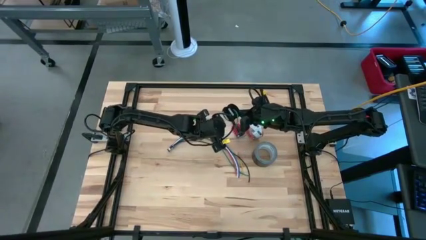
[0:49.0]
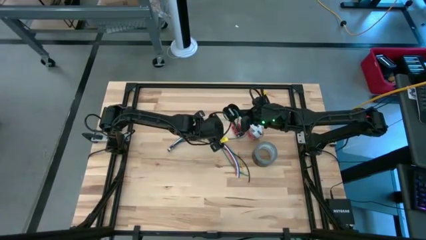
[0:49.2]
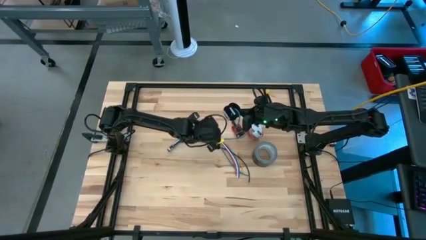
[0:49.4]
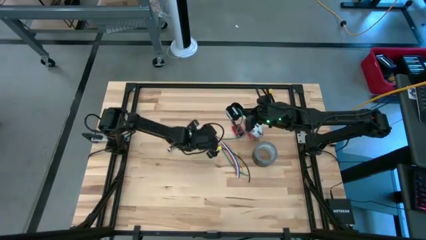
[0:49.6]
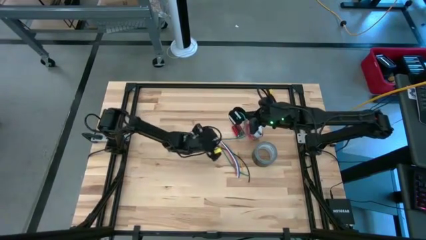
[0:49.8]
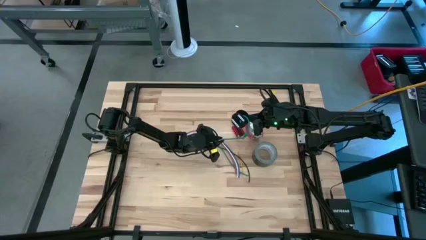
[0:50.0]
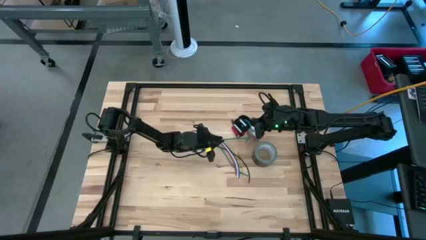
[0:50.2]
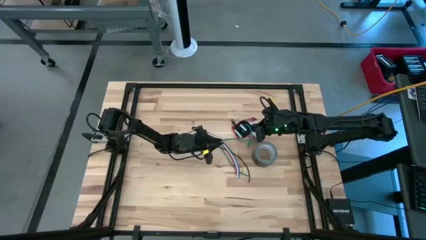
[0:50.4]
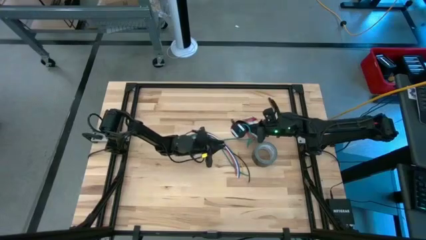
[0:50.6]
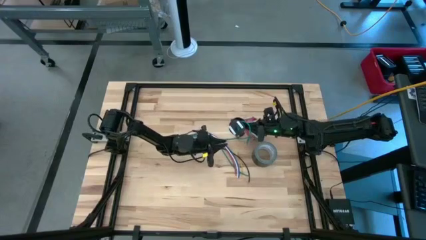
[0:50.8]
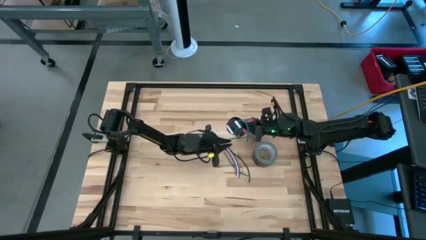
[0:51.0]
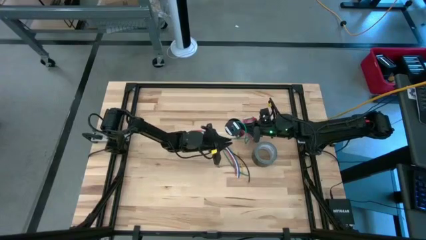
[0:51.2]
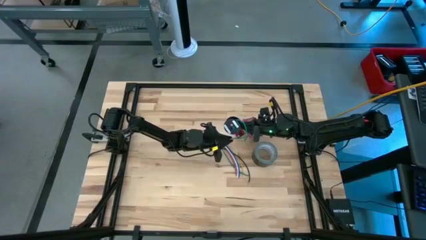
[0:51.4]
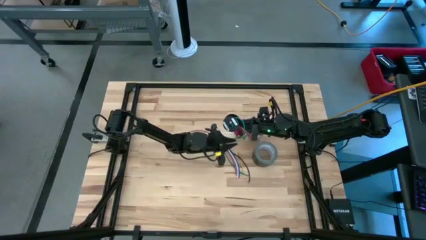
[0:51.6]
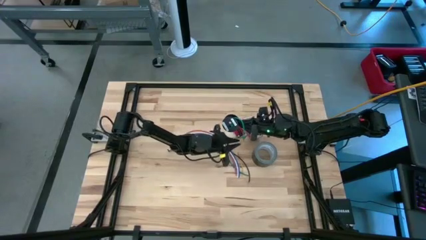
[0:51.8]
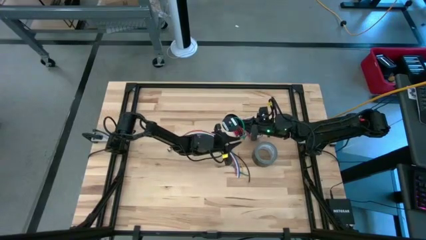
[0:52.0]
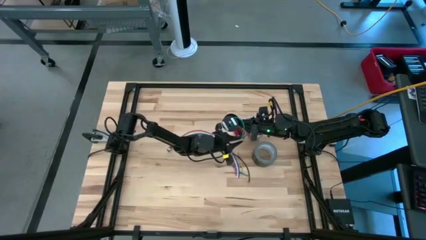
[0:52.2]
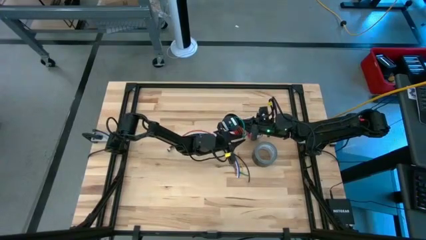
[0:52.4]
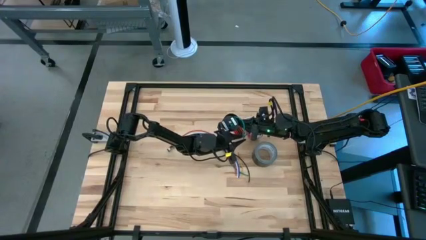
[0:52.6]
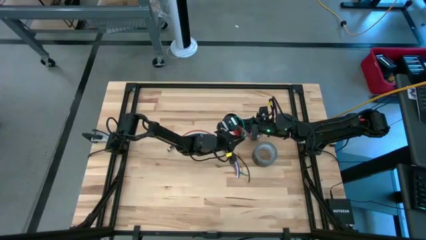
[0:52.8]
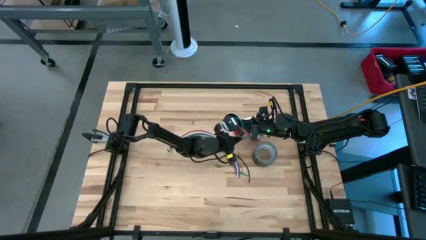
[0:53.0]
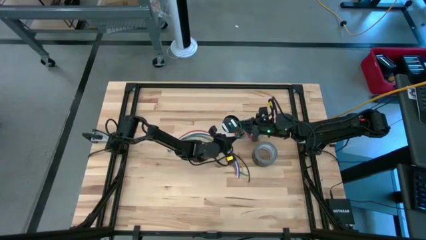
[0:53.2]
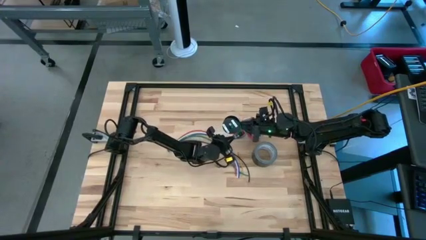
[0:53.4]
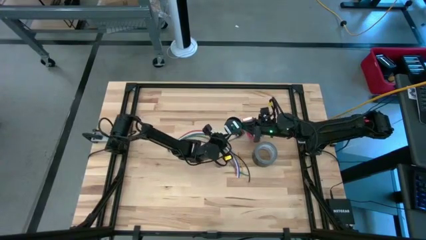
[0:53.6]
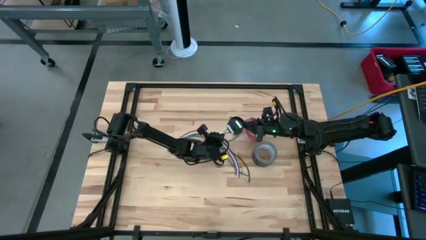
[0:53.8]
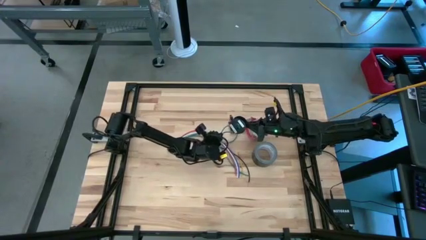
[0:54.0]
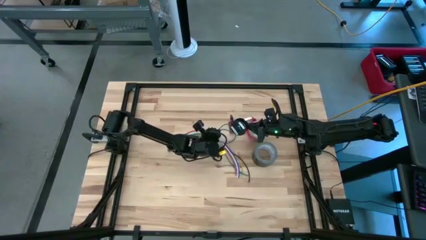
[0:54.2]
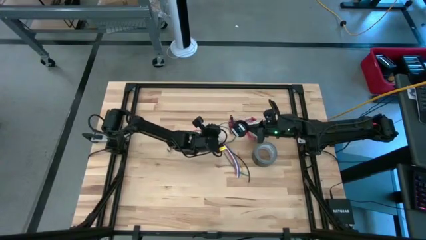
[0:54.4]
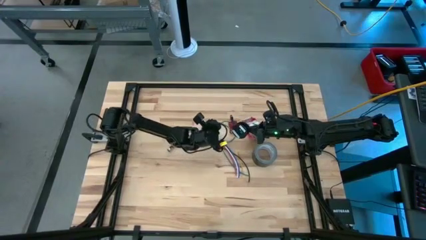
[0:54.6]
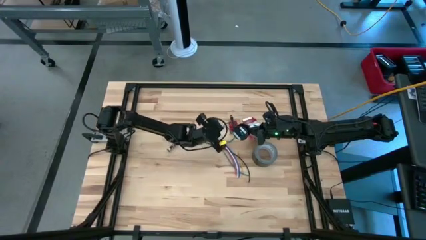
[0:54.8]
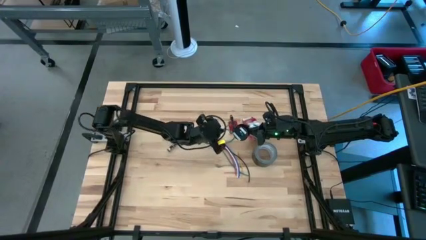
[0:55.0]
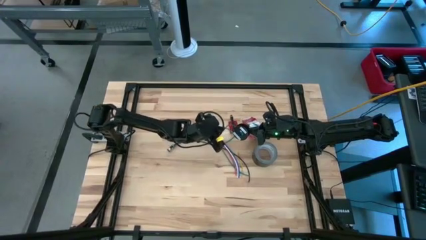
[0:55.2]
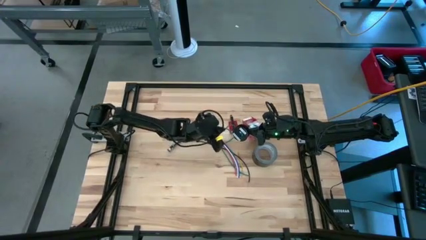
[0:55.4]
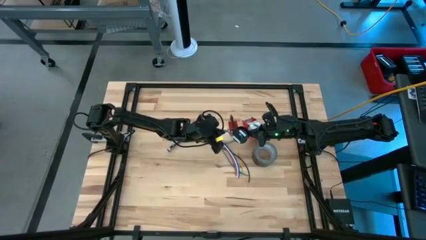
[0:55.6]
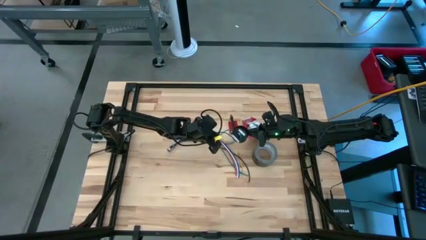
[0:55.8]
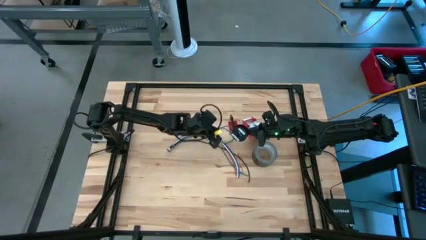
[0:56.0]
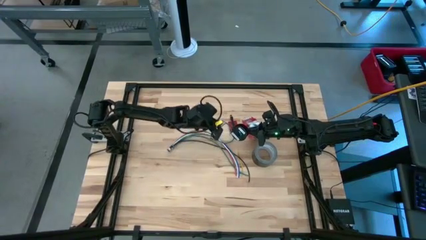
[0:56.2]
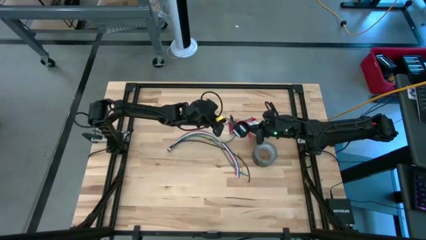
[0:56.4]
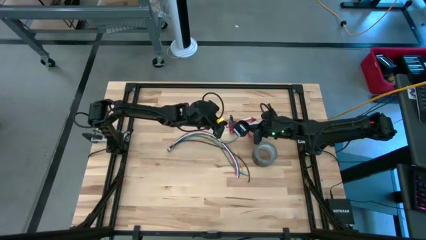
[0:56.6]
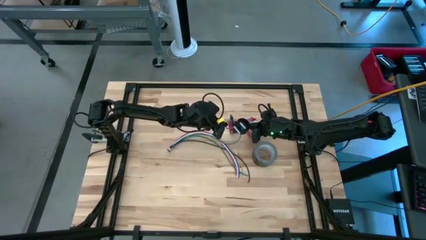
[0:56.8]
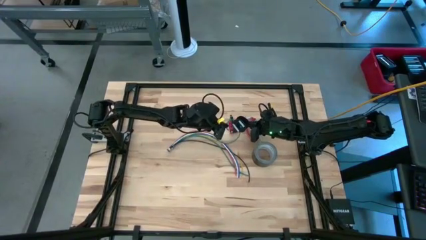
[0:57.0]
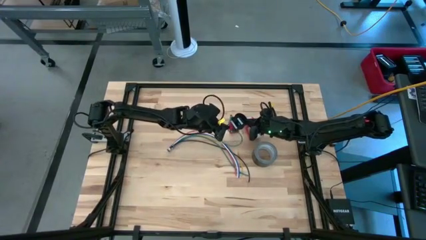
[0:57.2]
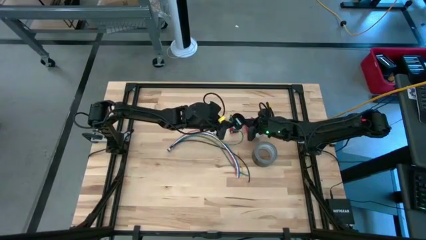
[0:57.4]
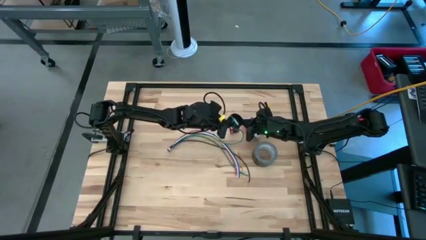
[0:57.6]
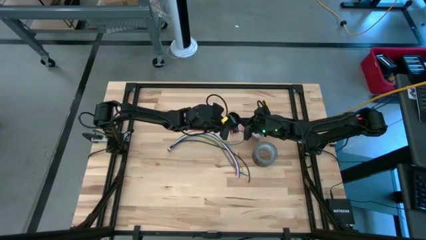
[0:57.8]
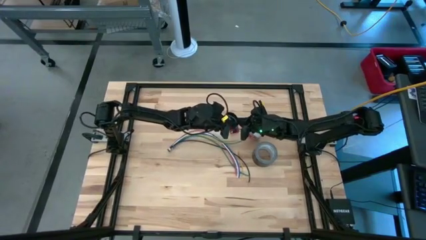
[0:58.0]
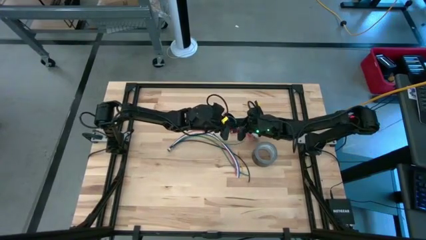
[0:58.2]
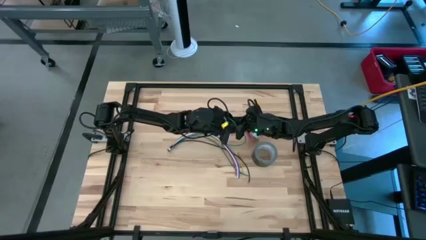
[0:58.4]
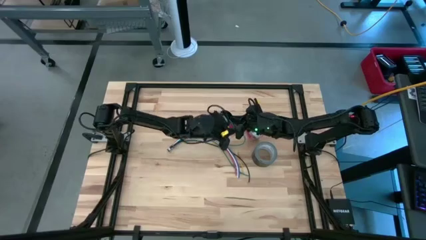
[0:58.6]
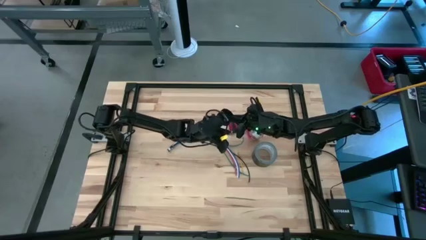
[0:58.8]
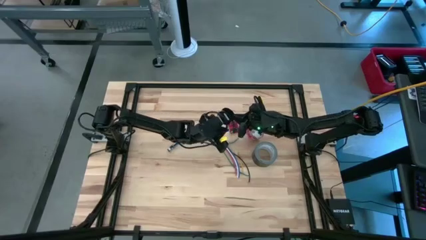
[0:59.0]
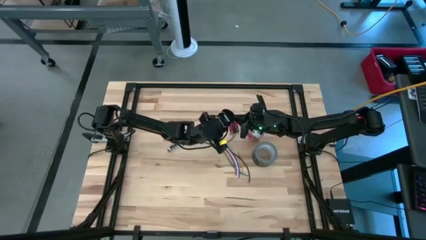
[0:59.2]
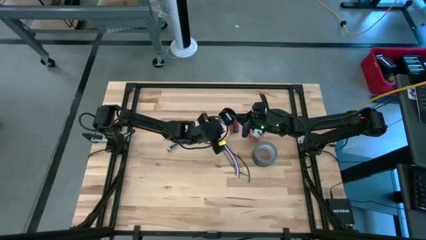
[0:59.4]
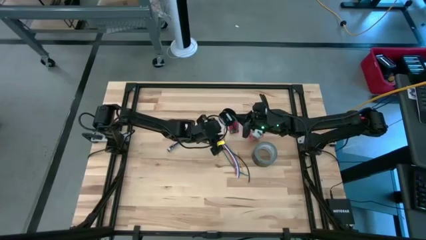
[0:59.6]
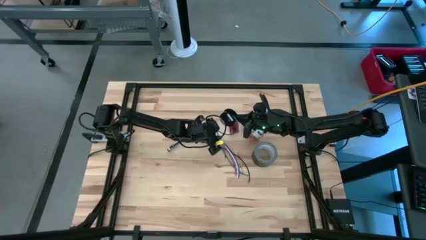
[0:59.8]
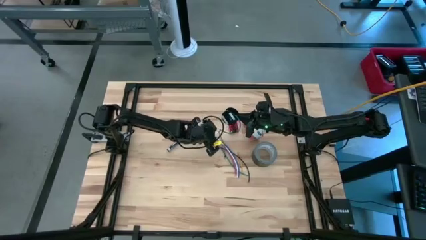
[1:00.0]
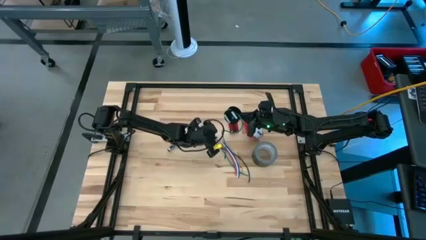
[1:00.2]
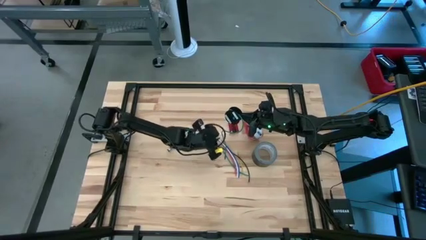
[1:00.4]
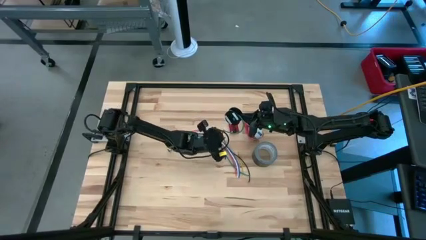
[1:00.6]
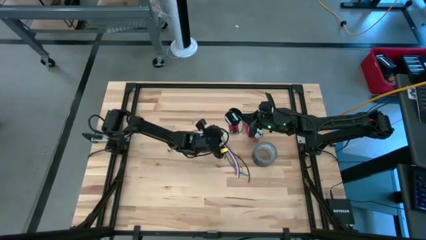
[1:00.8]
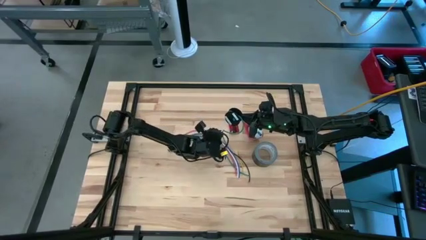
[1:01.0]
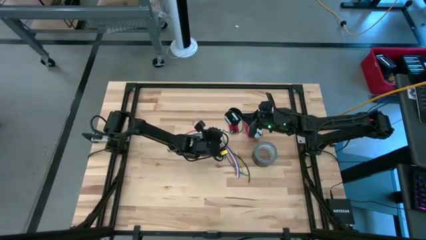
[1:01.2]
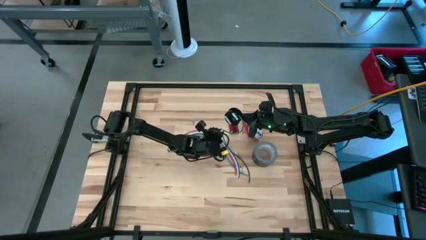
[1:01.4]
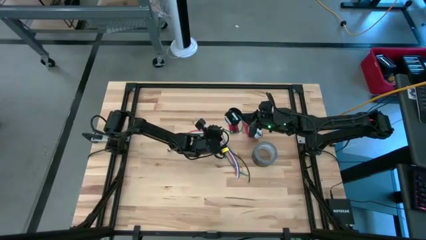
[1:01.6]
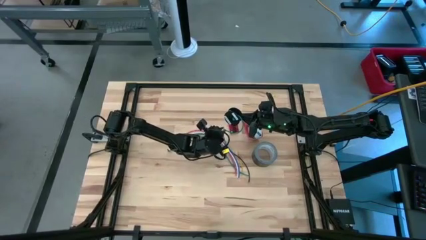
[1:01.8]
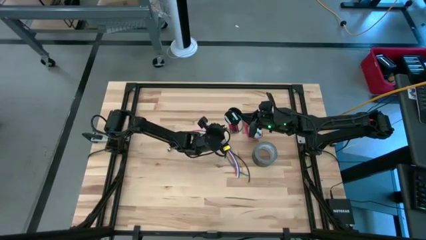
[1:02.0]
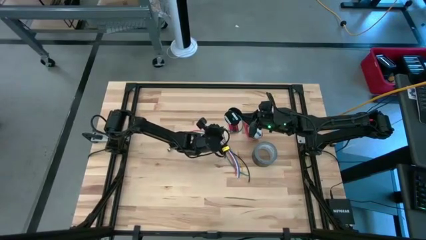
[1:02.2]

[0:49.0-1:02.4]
Task: Coil cords
Coil green wire onto the spool

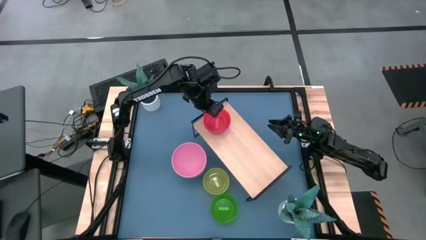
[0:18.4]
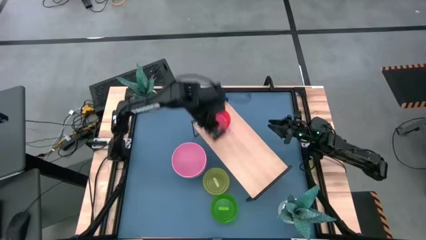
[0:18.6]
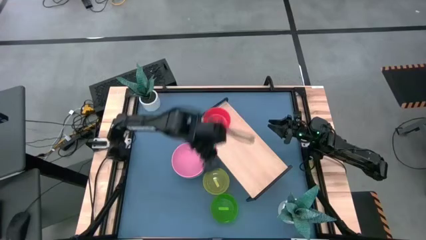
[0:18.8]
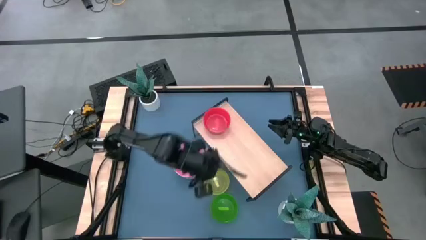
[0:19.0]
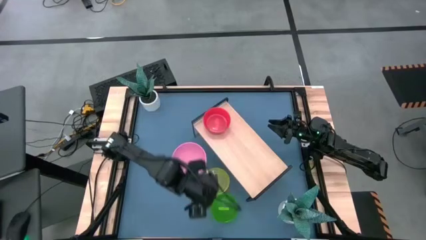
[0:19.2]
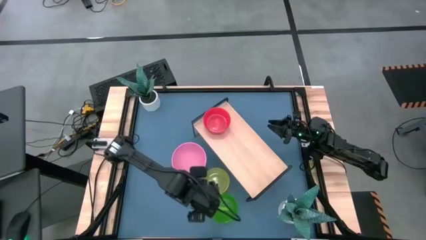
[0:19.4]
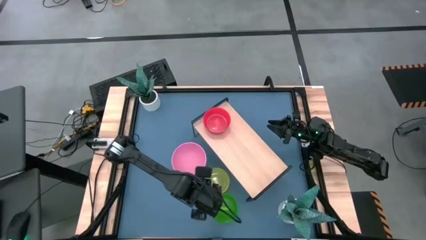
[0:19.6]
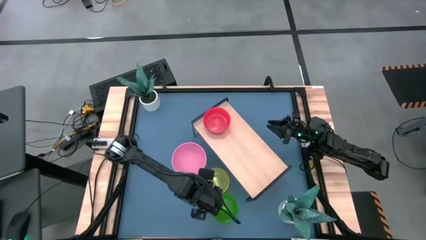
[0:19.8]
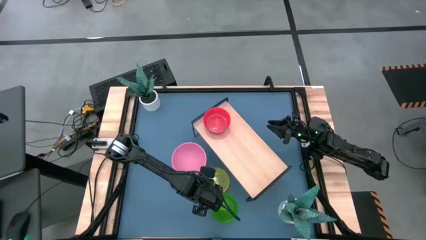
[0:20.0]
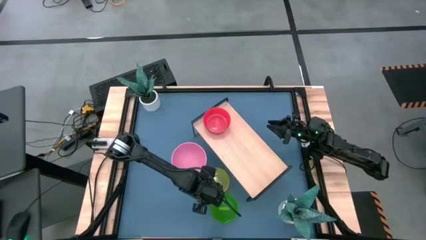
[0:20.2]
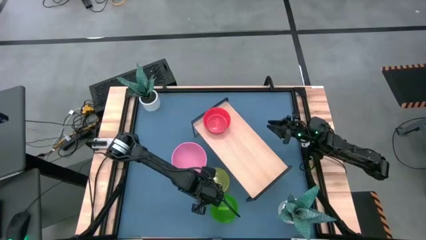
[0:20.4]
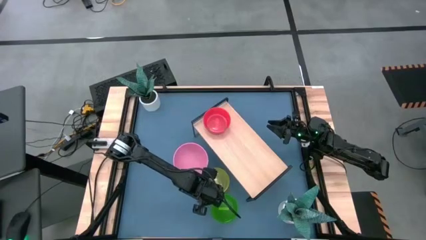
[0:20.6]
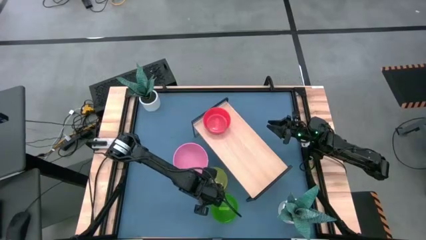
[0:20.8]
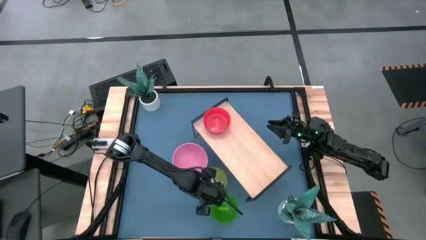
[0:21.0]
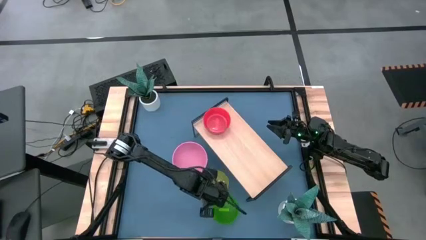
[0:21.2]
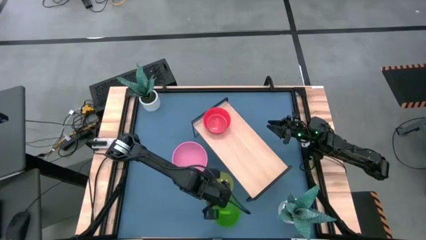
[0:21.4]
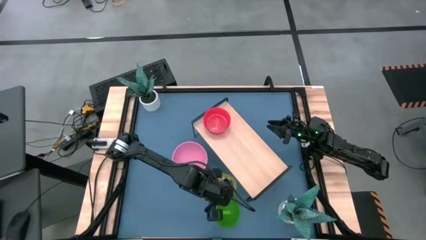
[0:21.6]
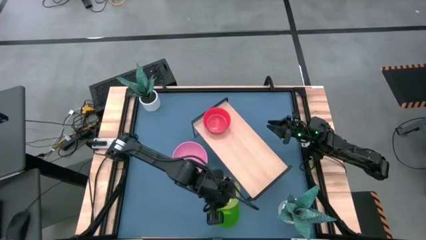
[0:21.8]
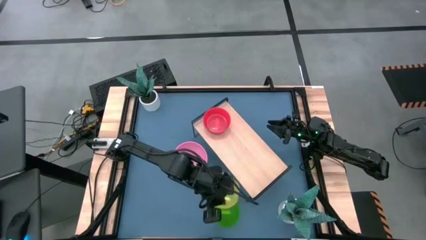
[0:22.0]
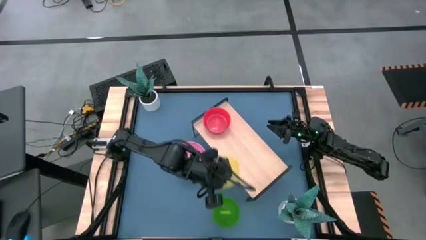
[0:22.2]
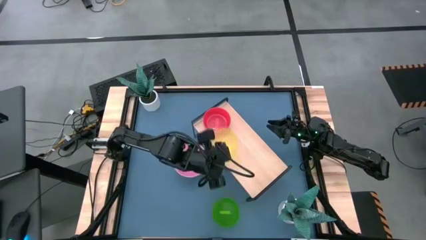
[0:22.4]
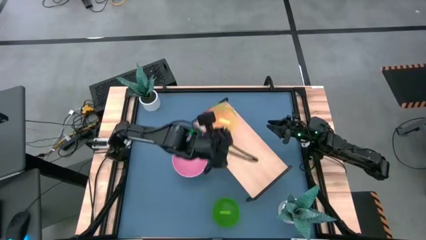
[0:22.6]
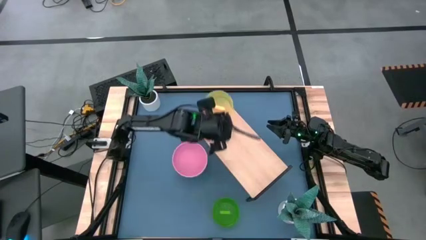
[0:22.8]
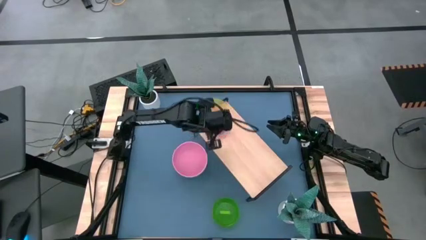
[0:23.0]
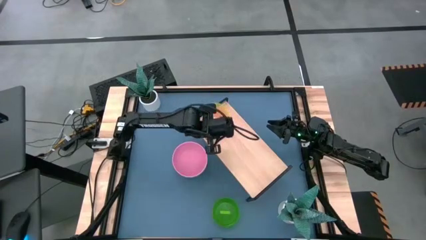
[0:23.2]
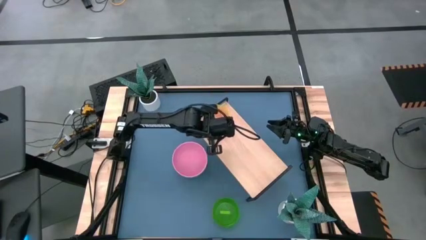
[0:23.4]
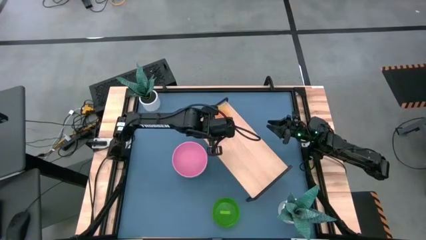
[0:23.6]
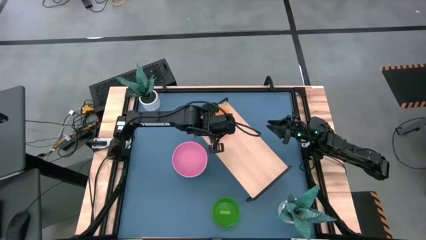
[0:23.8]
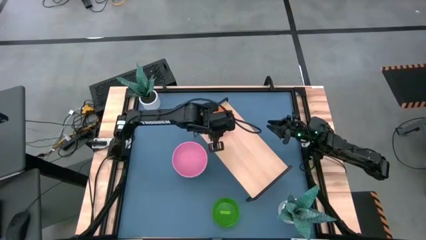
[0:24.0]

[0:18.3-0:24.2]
Task: Place and stack bowls onto a shelf
Stack the yellow bowl on top of the orange bowl on the shelf
